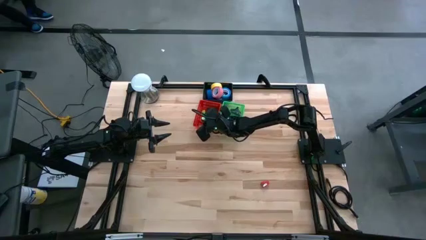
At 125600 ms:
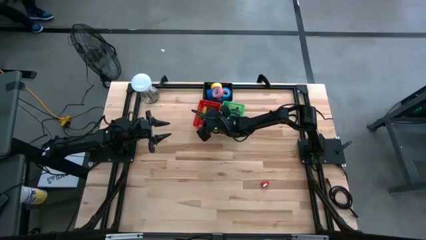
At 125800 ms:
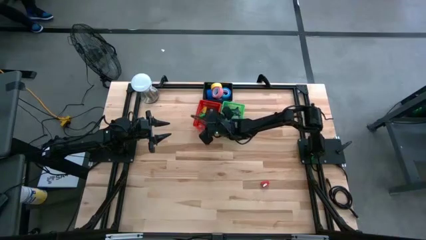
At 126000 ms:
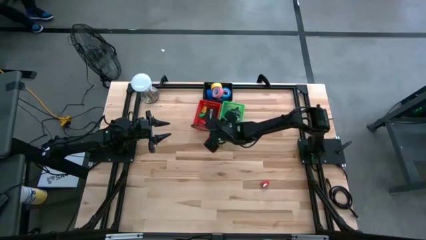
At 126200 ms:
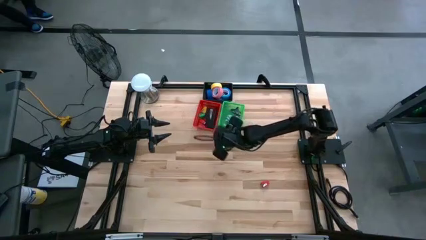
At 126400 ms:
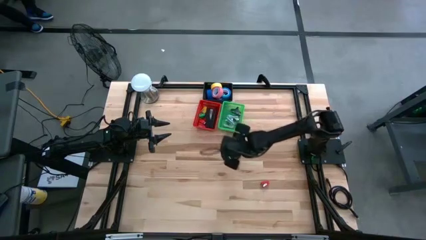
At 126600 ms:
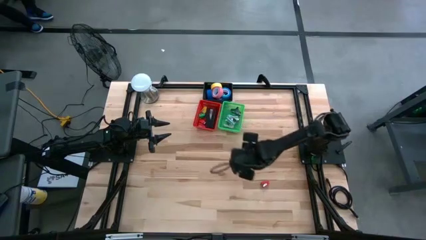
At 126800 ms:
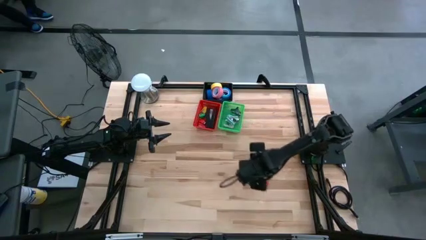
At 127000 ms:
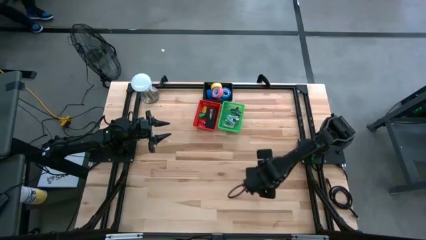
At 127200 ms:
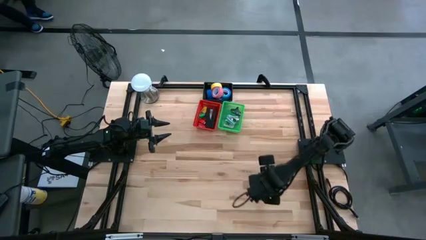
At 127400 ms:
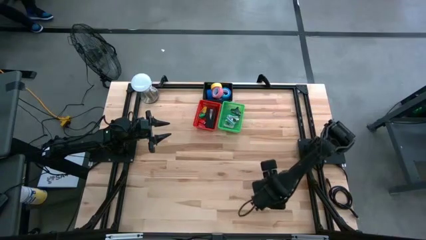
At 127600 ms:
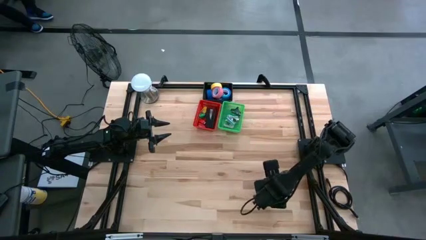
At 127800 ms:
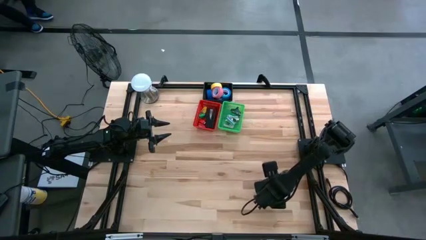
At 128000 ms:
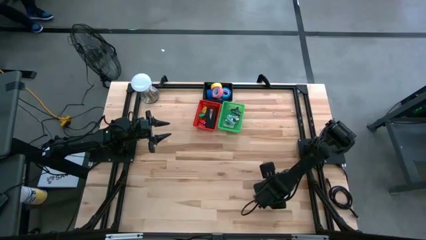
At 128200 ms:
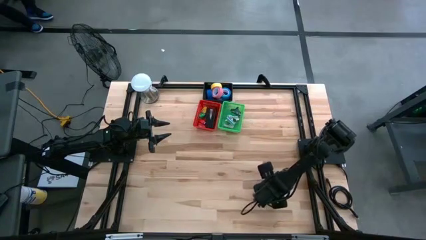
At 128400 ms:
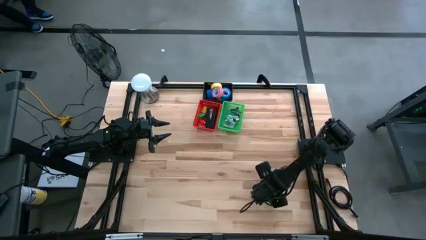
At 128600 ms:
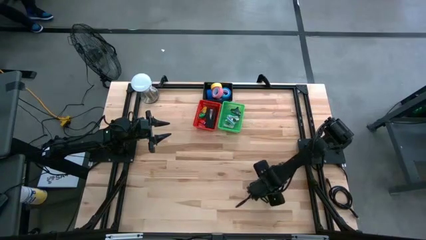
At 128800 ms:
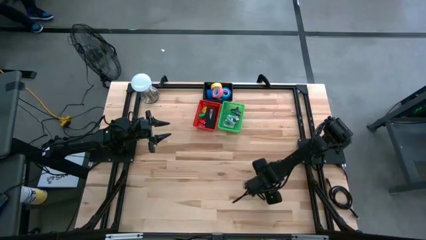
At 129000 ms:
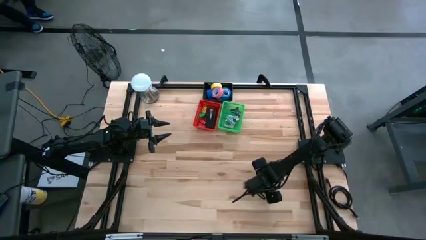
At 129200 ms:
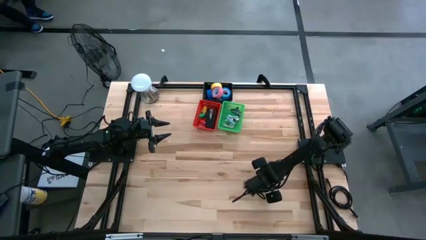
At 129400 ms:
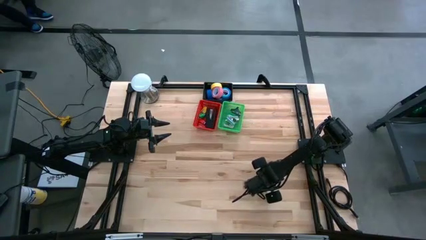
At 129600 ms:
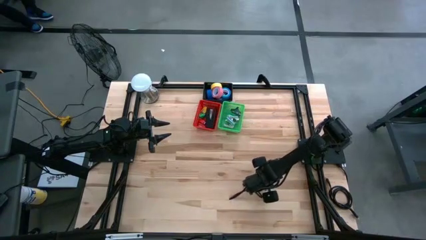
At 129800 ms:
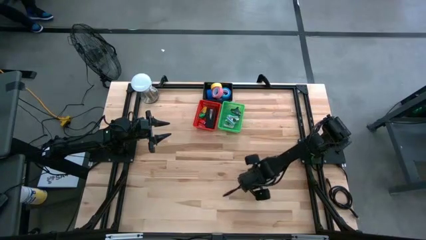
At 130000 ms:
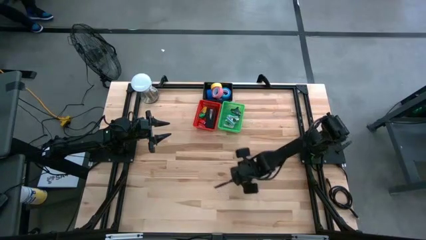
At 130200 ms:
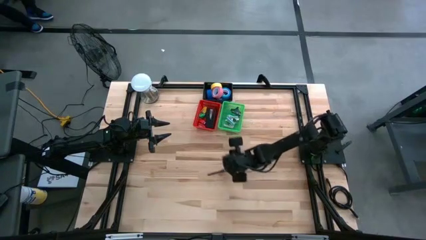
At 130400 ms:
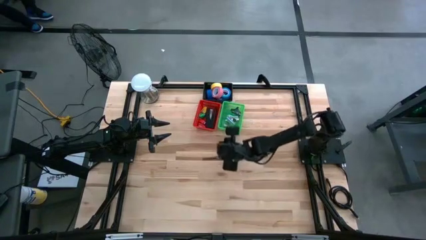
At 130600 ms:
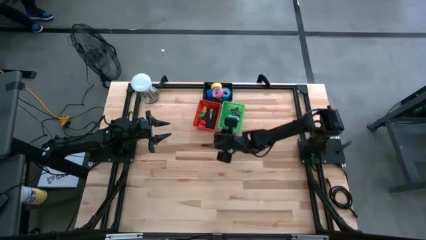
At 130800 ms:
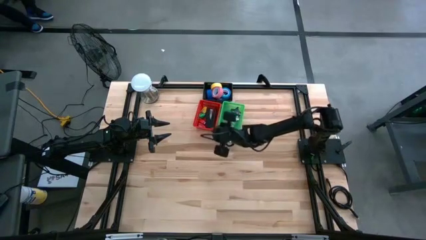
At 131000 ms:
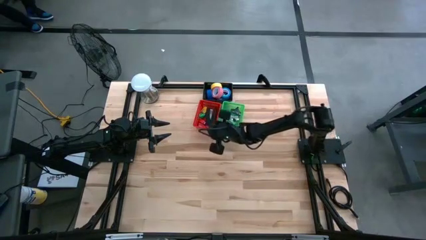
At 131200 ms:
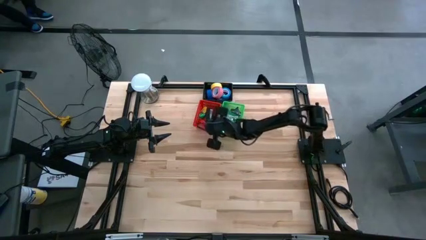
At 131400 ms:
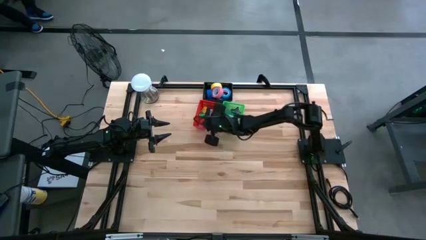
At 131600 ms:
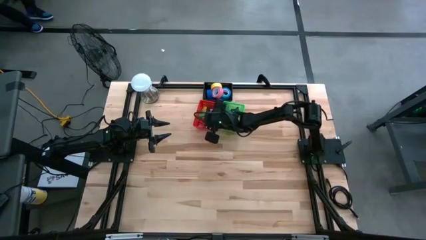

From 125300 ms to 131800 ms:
Task: Pick and place Stapler, Stapler remover, tape
Put the small red stapler into the red bin

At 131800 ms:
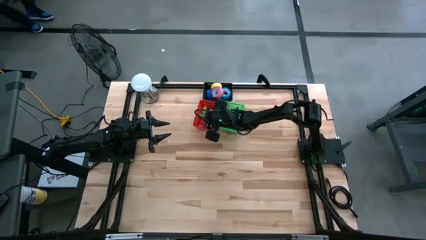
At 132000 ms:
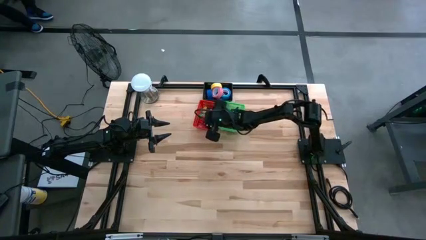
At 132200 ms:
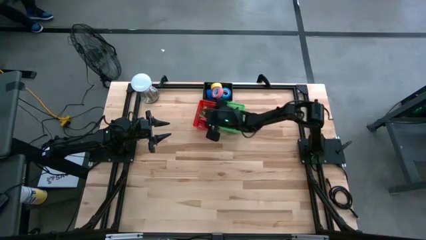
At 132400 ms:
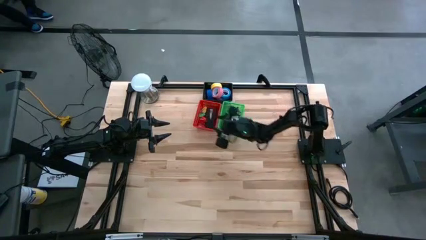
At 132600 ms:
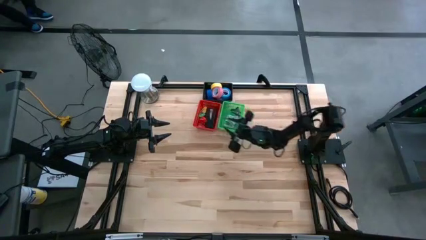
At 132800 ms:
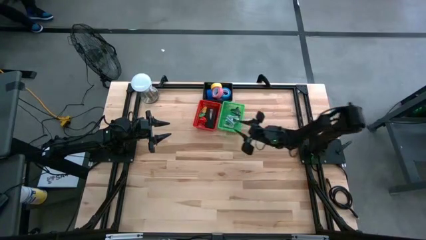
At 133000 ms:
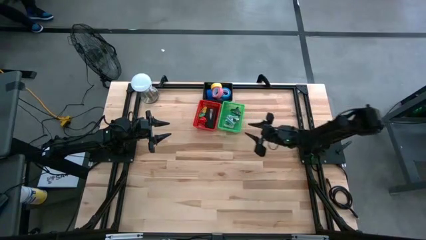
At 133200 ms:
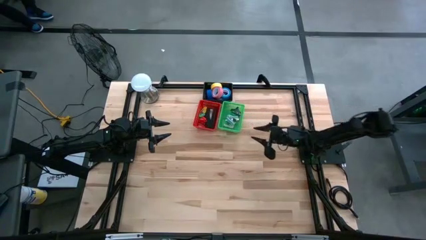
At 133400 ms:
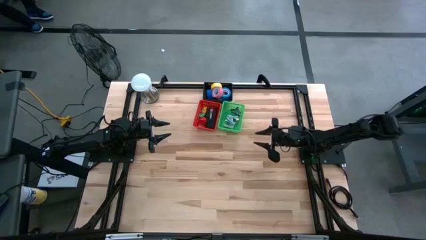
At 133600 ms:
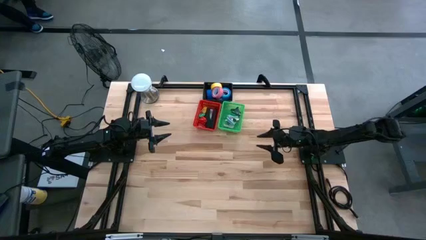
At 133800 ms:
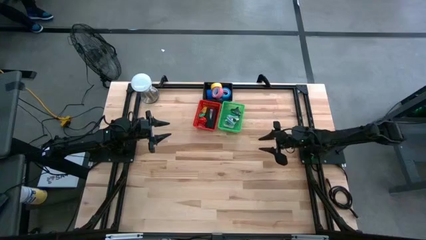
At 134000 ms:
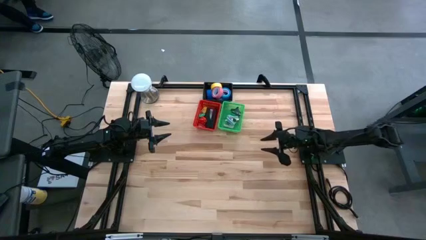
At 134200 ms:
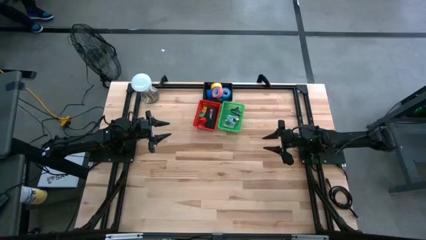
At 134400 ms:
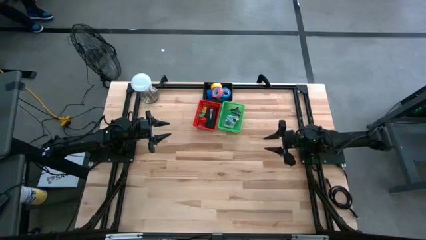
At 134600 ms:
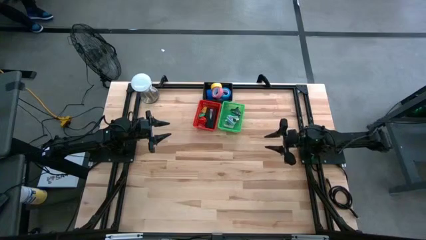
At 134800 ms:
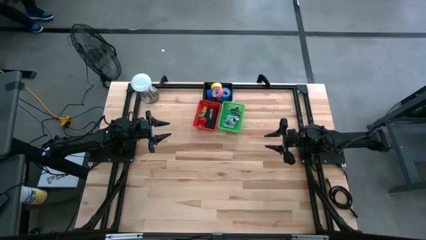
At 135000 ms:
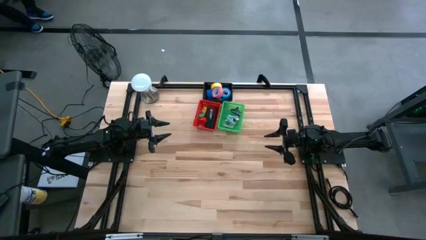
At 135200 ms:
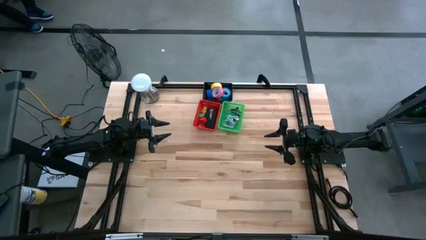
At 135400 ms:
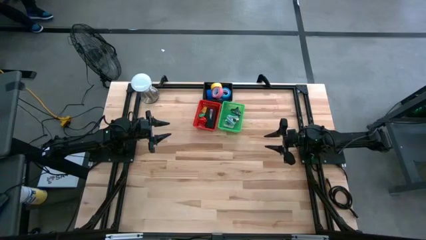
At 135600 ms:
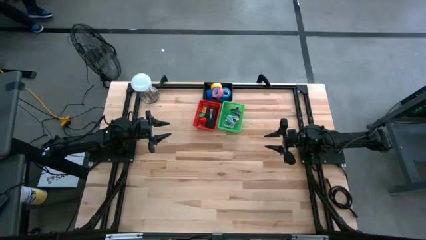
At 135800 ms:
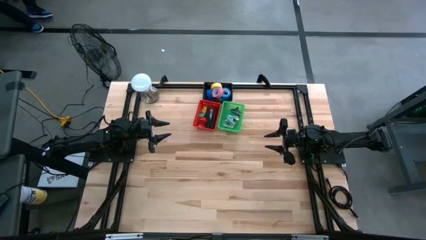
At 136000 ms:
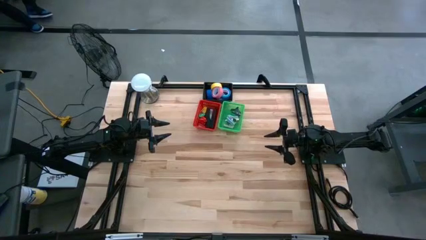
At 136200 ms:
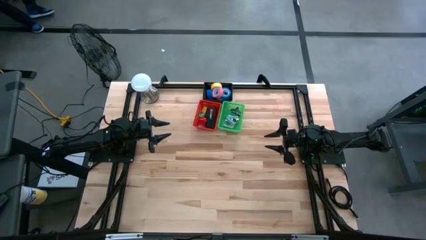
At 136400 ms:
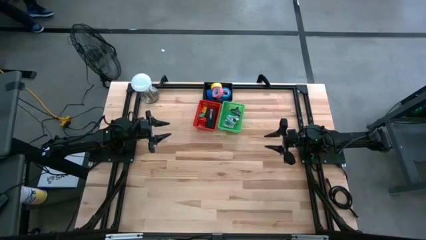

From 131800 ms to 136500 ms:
Return to Home Position

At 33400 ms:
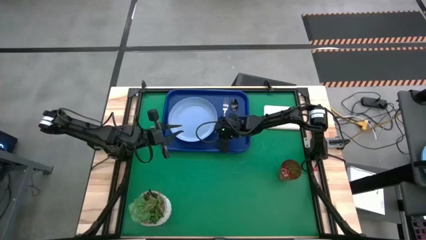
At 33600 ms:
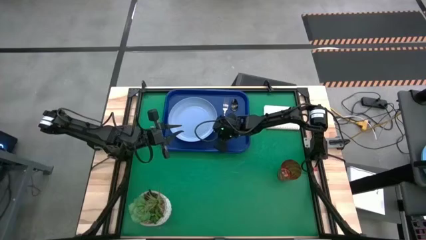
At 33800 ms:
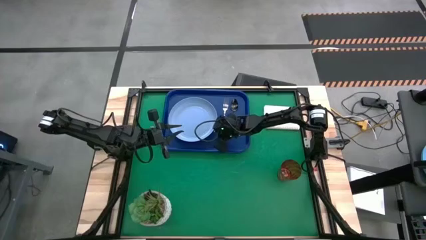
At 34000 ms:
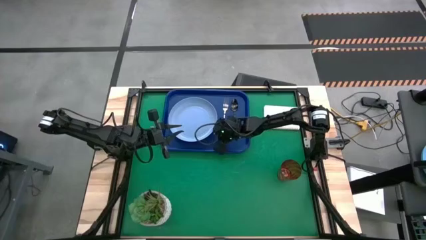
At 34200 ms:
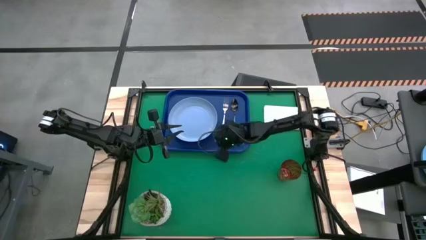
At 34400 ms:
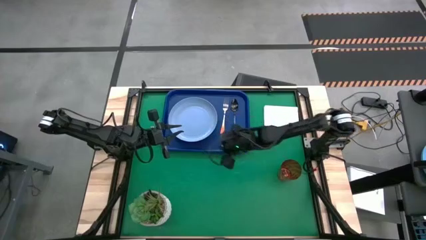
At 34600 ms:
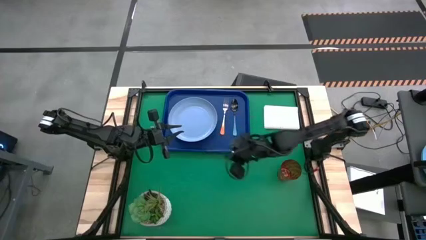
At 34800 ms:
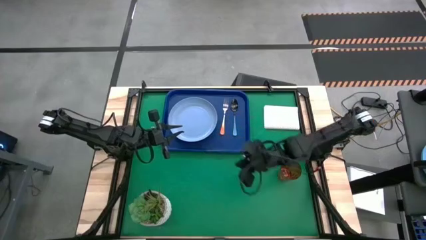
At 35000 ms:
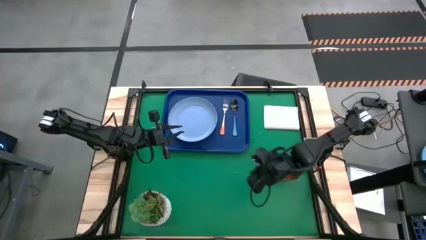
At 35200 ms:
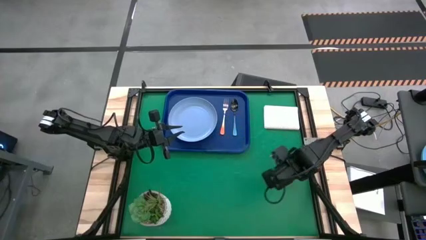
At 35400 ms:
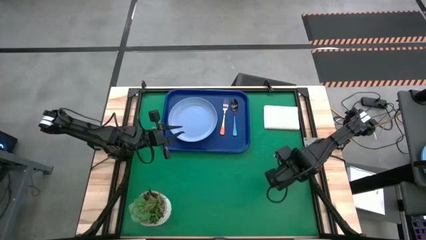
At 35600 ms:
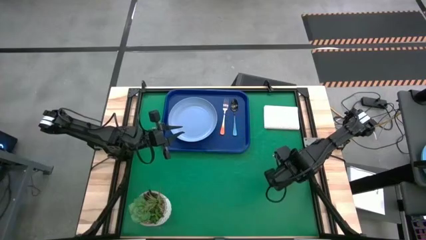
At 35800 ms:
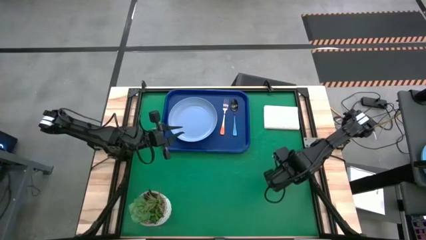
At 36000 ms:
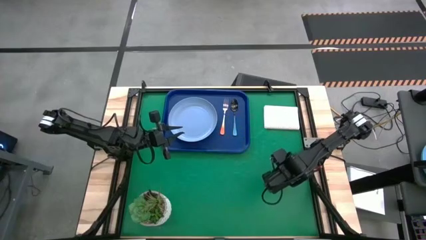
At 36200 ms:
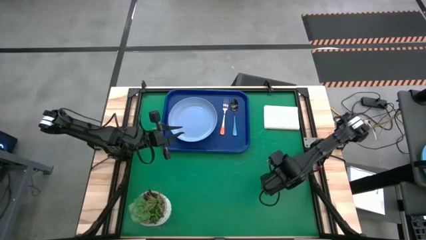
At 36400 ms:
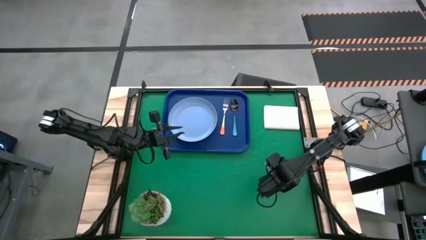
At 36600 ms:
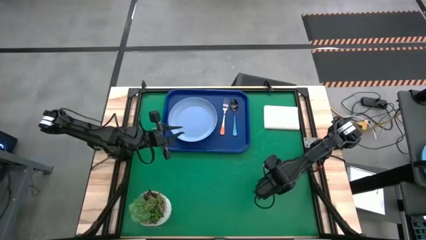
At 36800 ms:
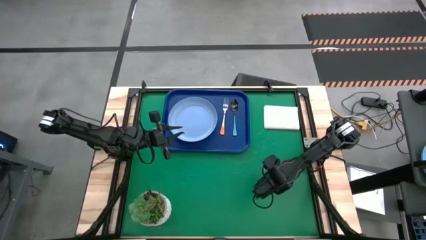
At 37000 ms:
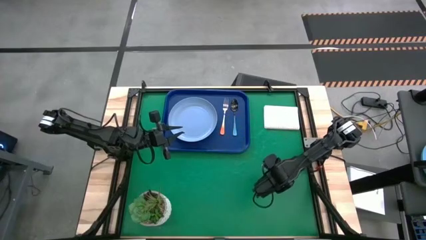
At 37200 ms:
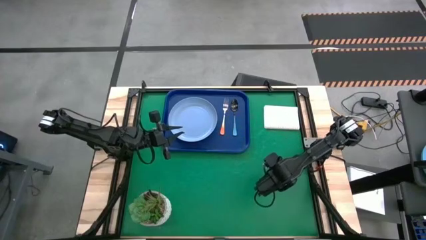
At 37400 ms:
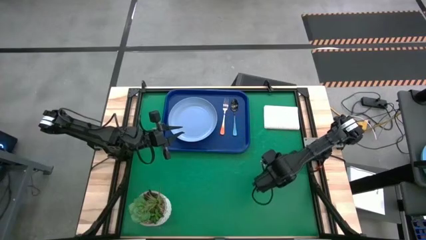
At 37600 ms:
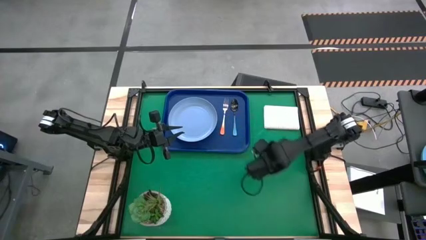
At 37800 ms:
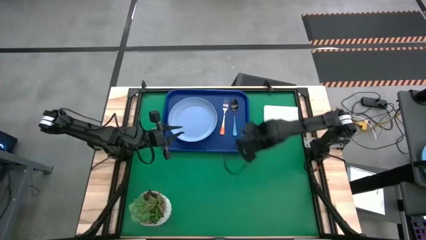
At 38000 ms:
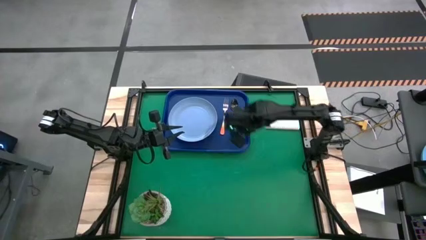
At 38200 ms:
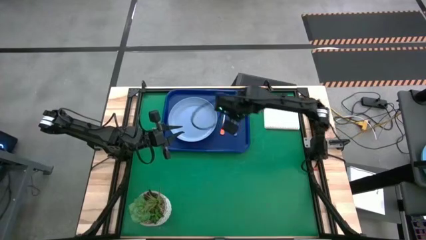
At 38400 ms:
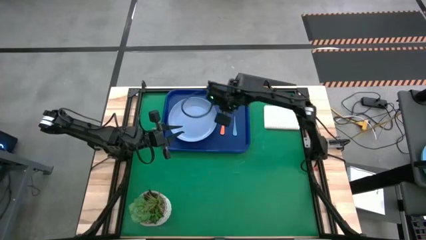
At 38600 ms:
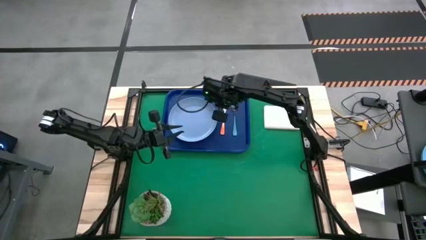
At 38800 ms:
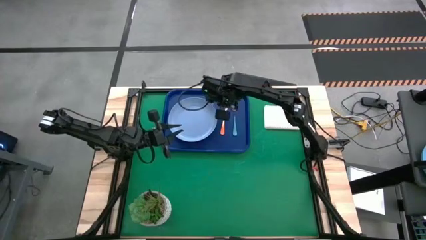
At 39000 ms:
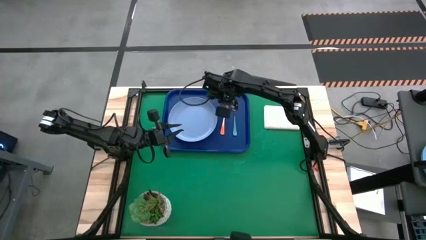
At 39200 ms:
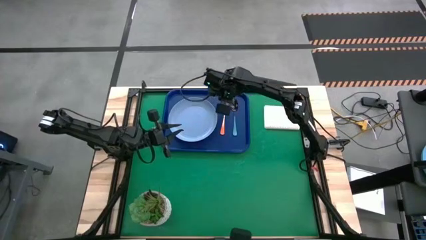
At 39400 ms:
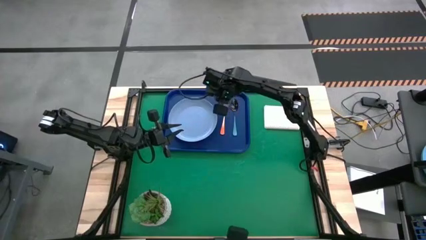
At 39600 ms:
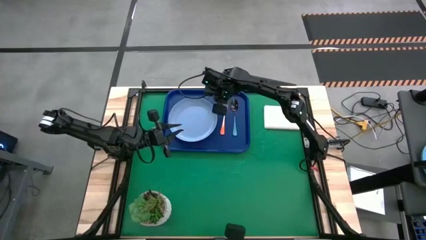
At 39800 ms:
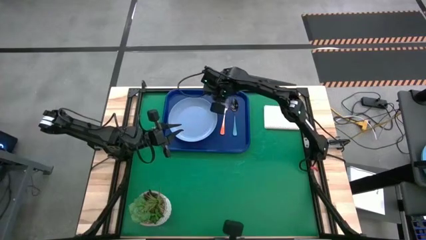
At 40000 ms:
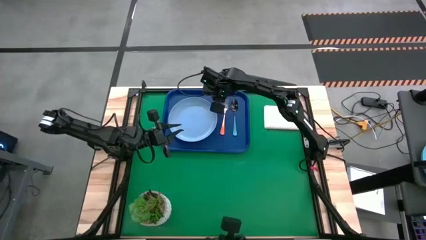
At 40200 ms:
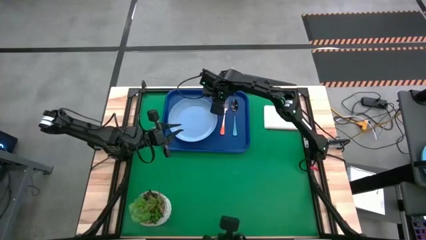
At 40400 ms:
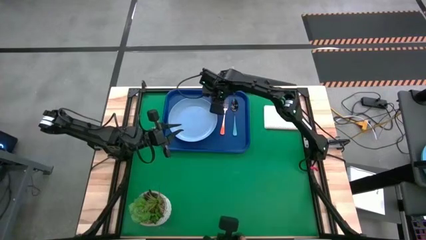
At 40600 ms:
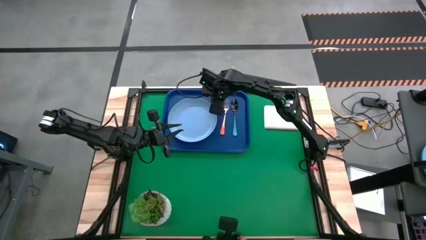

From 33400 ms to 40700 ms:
Task: Pick and place plate/cup/fork/spoon on tray
Put the orange cup on the blue tray to the top right of the blue plate
